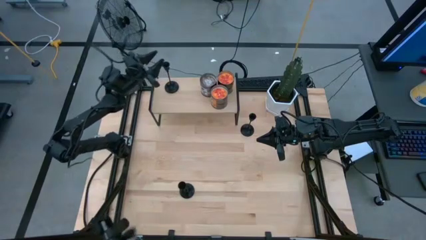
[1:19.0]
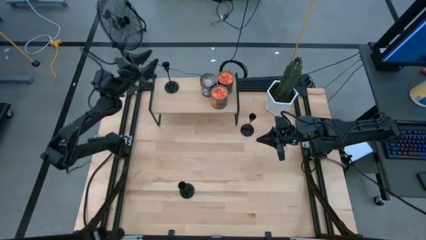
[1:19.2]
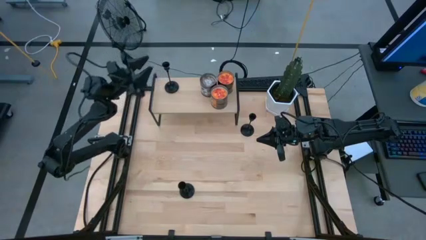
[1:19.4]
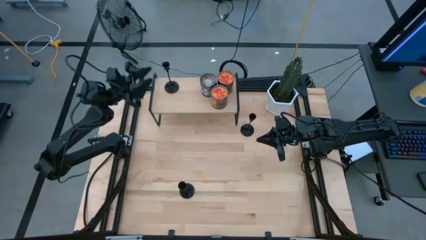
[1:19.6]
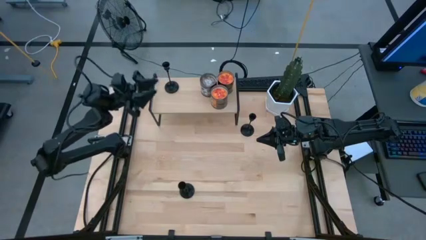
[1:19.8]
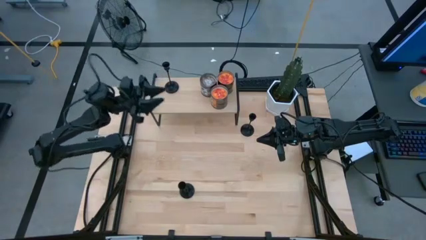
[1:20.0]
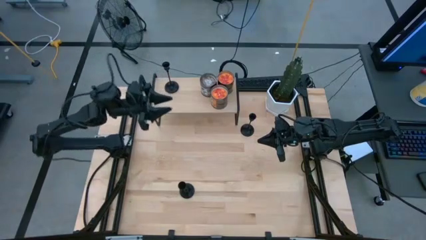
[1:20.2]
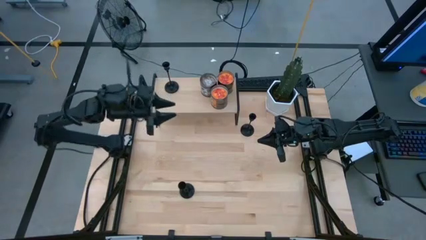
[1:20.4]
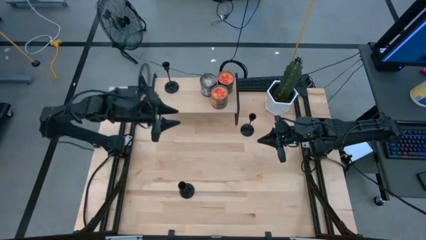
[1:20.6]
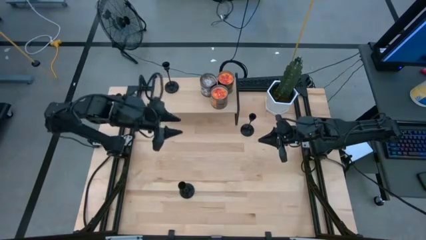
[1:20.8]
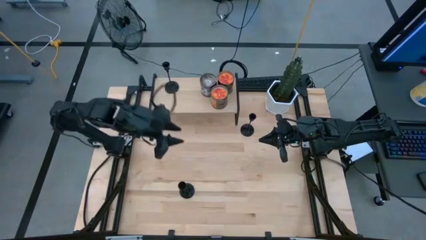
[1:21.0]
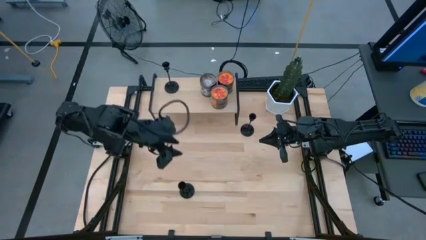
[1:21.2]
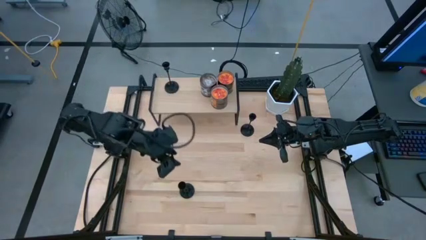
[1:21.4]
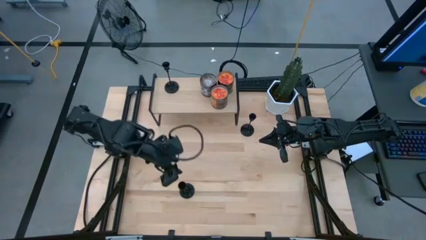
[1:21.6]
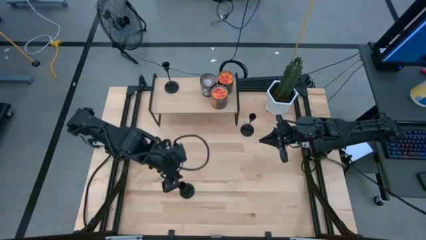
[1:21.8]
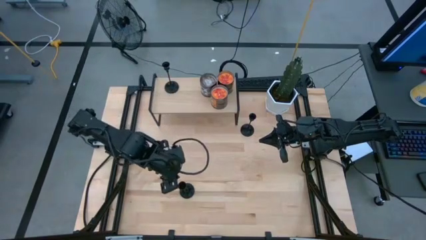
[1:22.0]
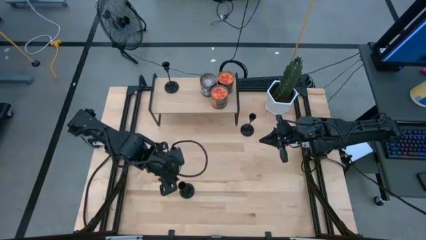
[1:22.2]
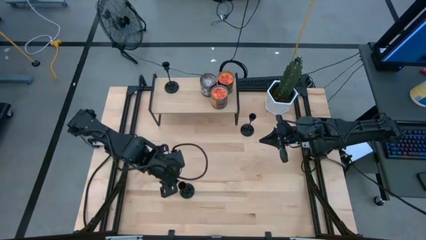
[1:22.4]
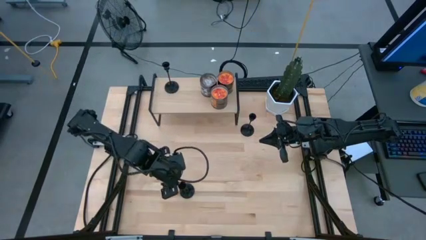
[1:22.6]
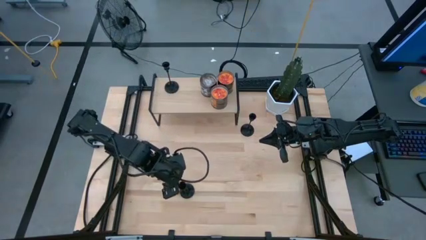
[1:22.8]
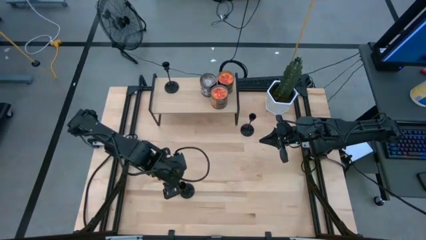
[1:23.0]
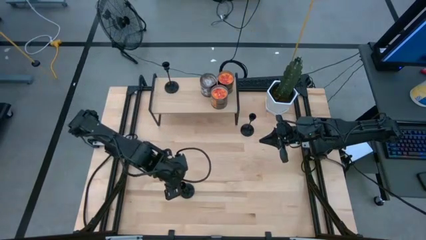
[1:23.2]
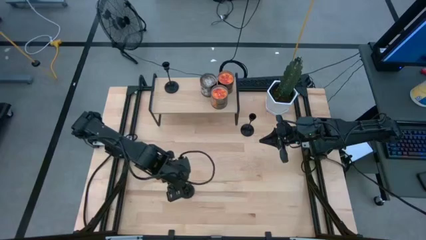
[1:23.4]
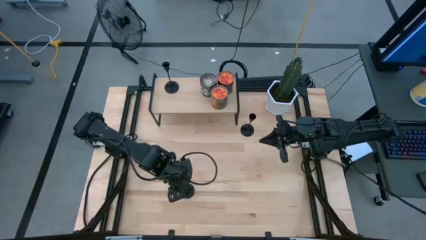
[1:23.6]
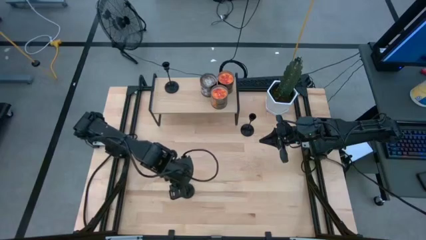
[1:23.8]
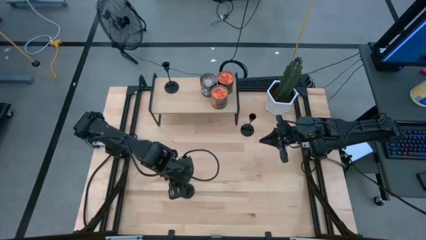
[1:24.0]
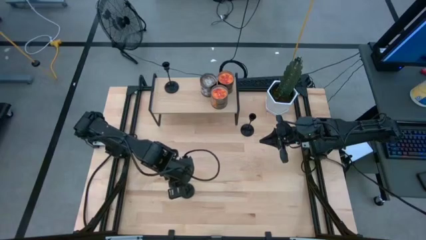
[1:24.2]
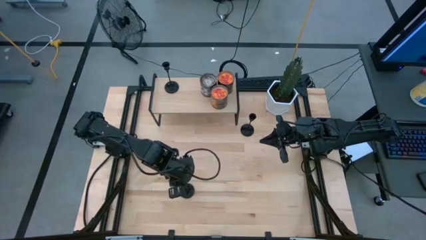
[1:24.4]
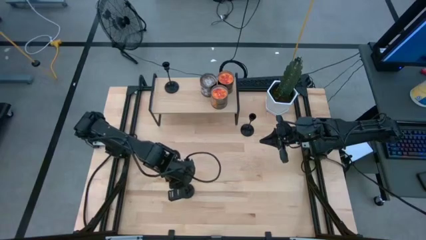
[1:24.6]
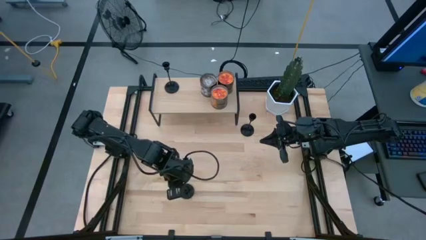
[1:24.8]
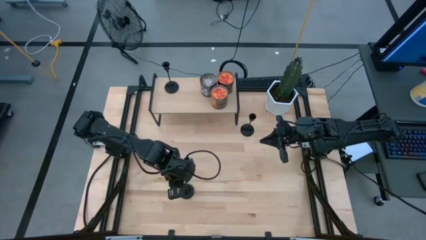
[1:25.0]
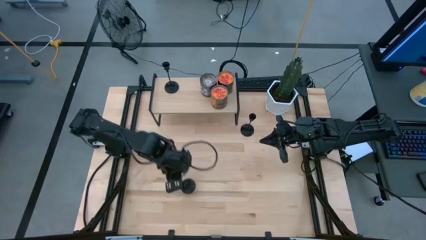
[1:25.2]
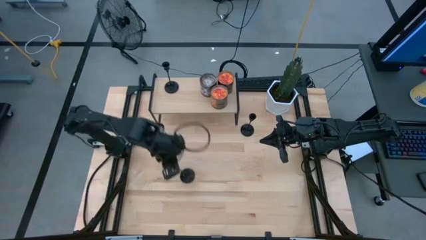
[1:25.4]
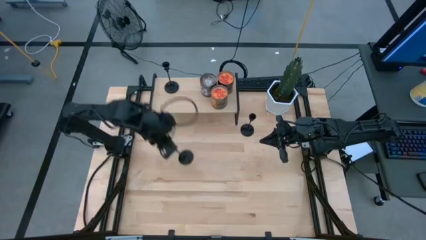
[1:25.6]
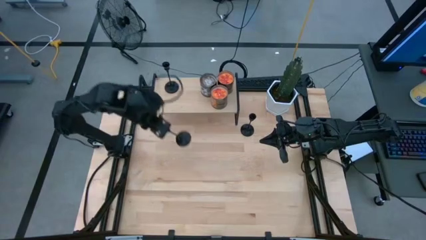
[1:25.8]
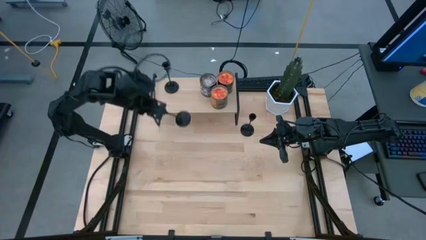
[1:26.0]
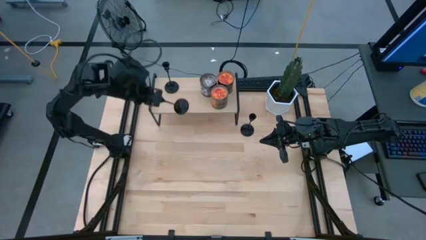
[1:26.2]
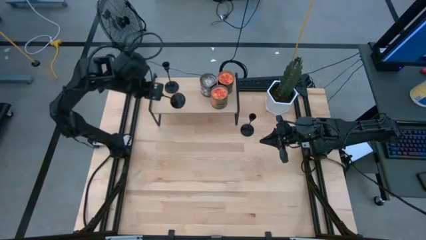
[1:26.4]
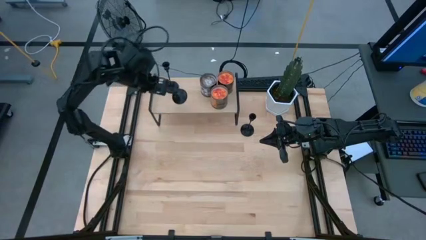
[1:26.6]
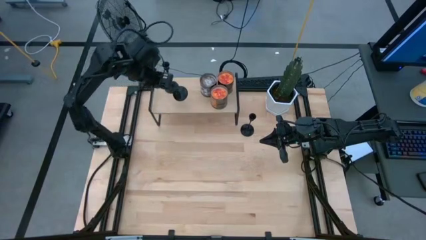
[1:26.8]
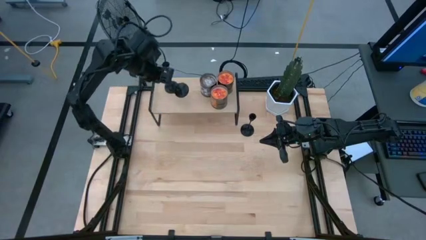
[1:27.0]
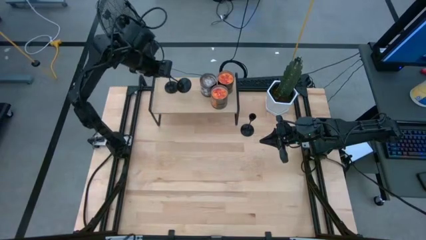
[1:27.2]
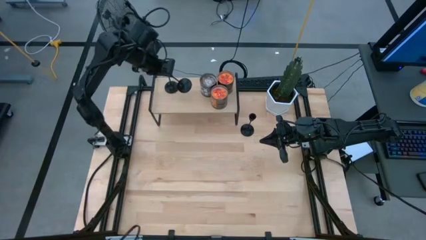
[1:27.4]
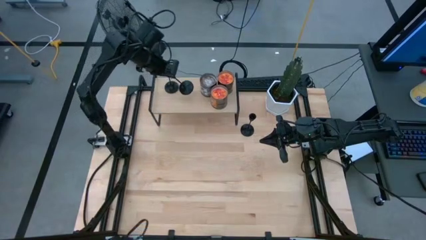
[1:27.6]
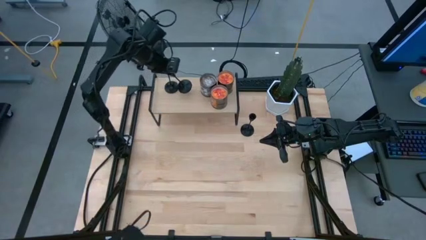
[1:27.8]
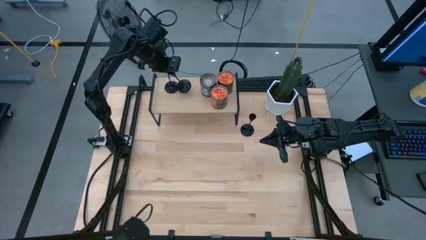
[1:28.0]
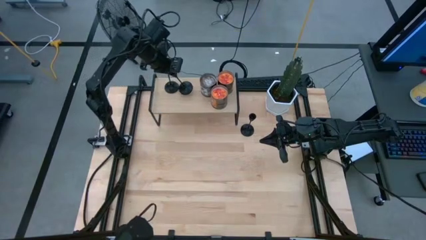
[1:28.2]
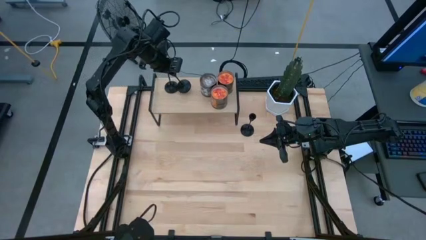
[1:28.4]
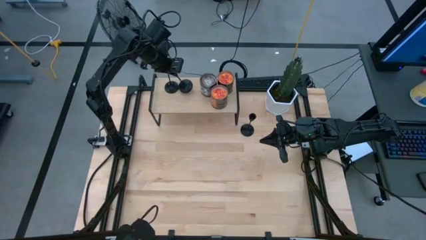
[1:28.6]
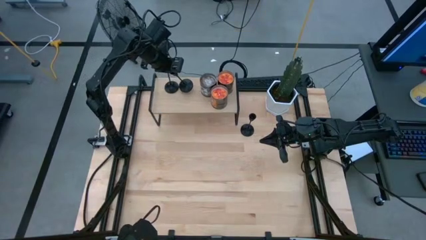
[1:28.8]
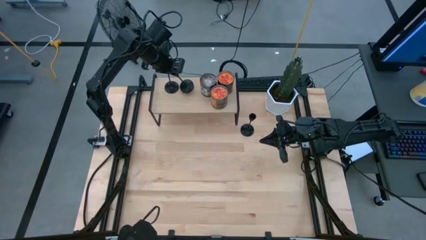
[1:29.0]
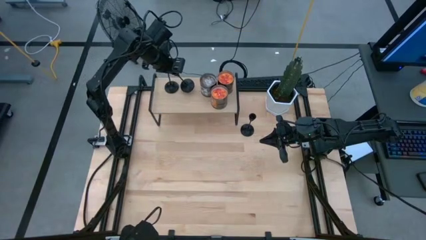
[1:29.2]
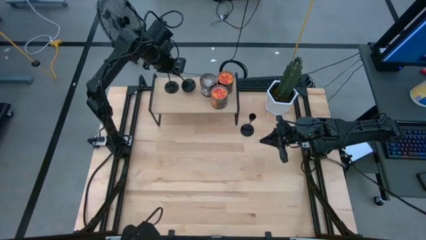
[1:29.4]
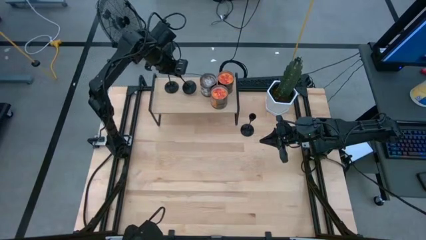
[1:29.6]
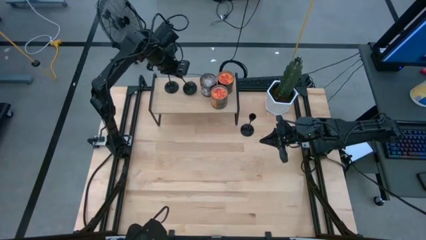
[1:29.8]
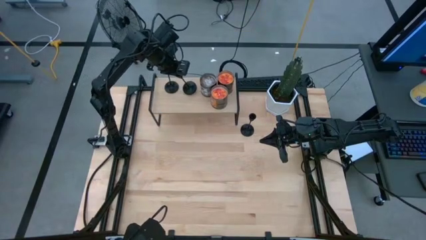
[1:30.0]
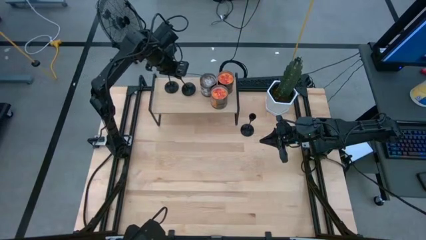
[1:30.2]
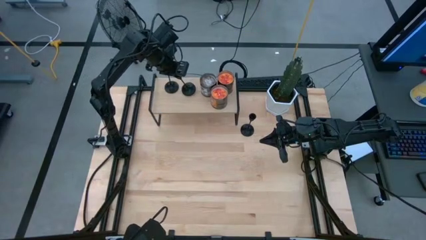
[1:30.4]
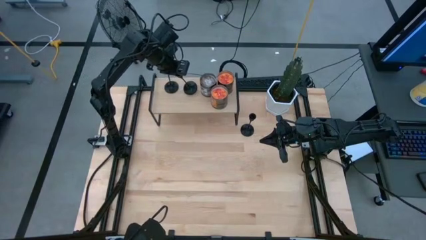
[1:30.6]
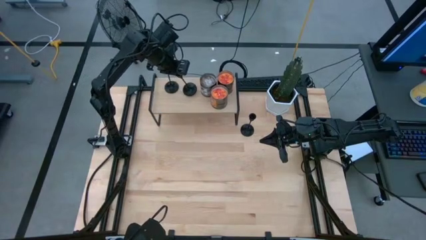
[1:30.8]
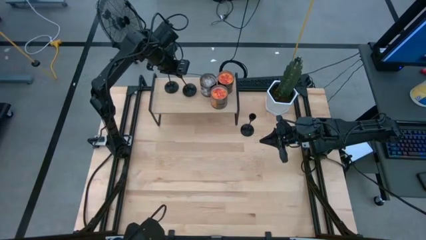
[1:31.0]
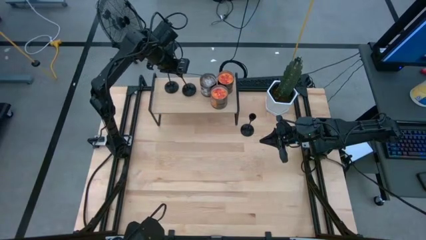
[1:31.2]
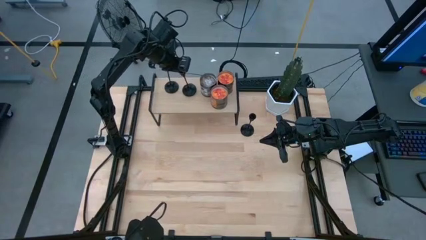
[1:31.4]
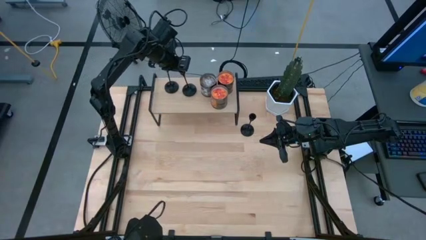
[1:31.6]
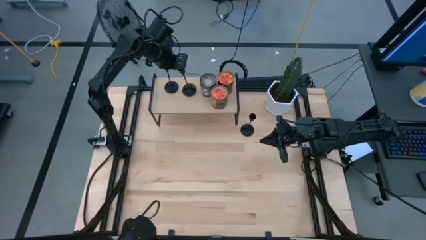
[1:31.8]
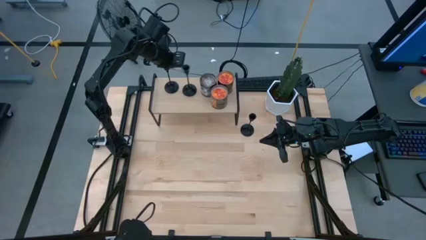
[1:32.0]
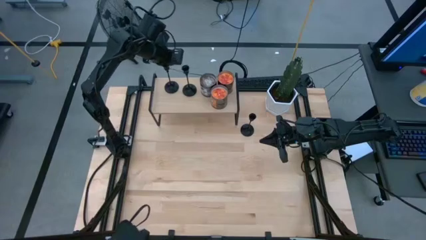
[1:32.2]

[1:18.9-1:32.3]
Task: Pick & Place candle stick holders
Put the bottom black candle holder on the shelf

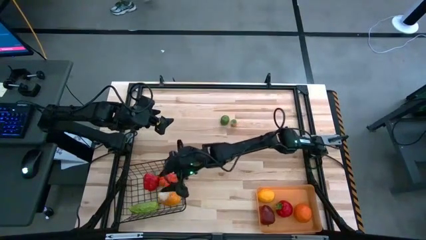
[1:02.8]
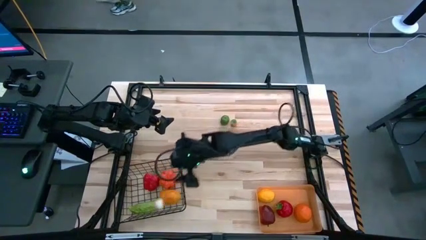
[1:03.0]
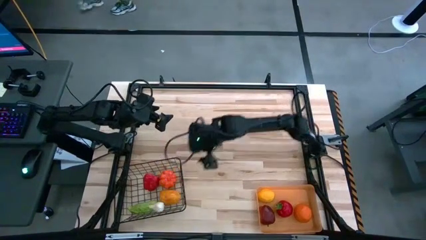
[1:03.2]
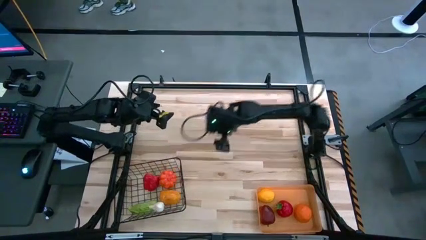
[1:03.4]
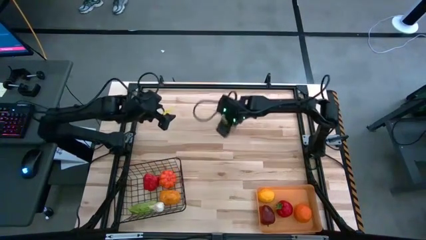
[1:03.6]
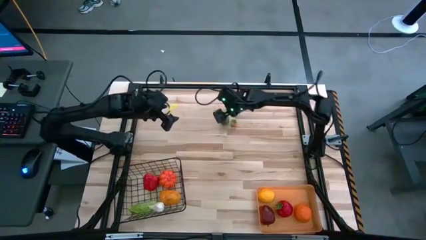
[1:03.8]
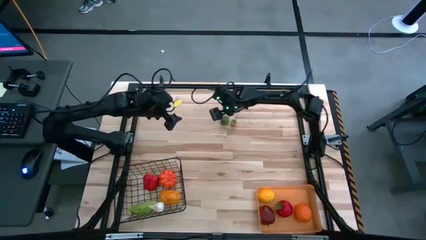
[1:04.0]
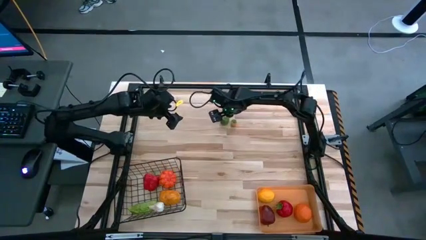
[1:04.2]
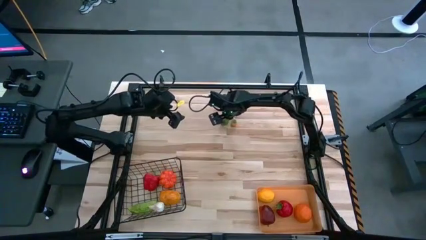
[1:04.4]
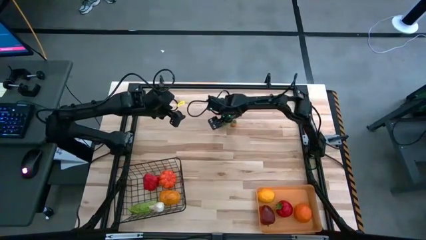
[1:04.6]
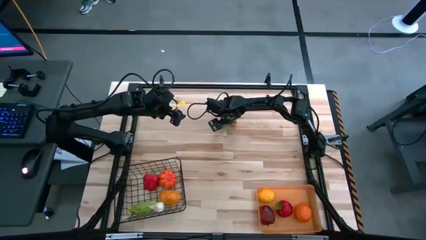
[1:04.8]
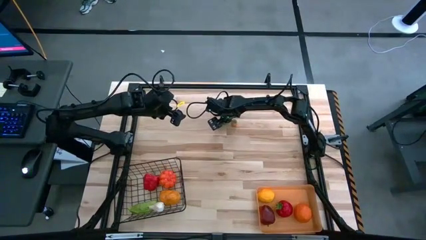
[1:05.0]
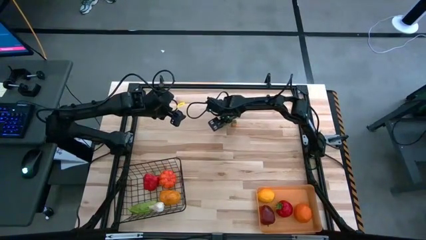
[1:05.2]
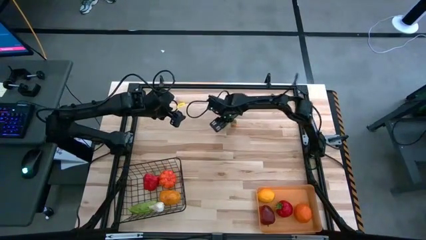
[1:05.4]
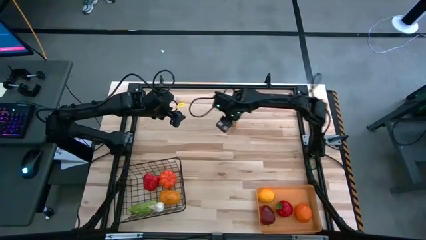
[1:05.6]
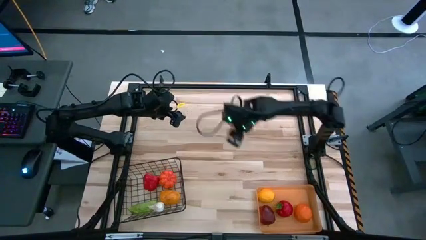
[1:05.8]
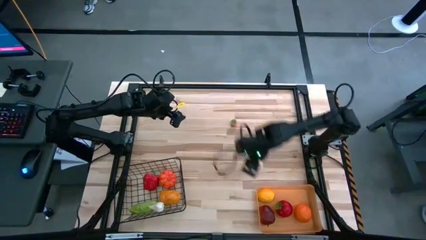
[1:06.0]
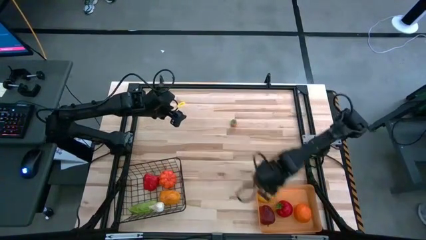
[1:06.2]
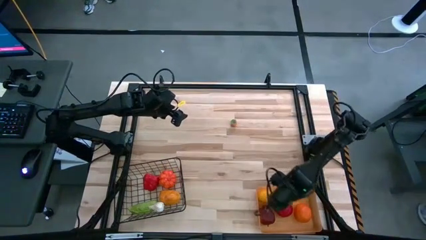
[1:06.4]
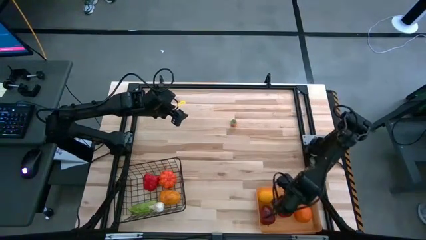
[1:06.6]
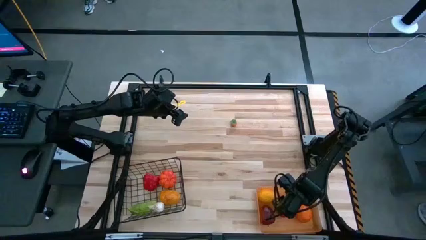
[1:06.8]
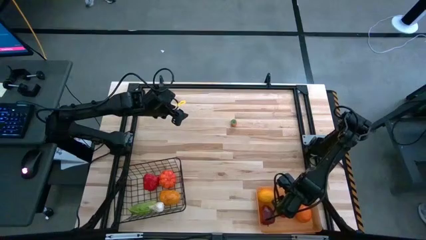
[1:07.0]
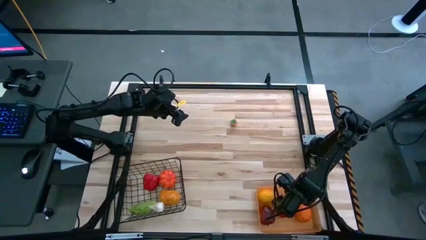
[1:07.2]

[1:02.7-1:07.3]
Task: Sort produce into baskets
Put the green lime into the orange bin
